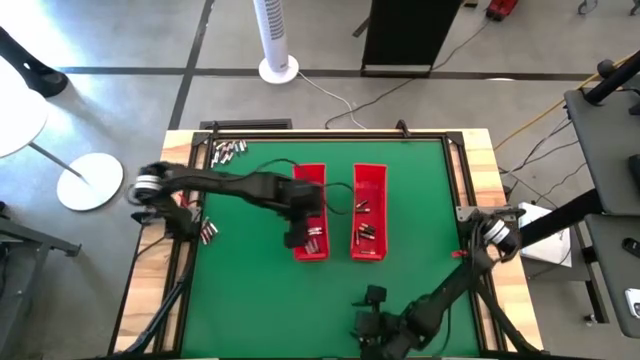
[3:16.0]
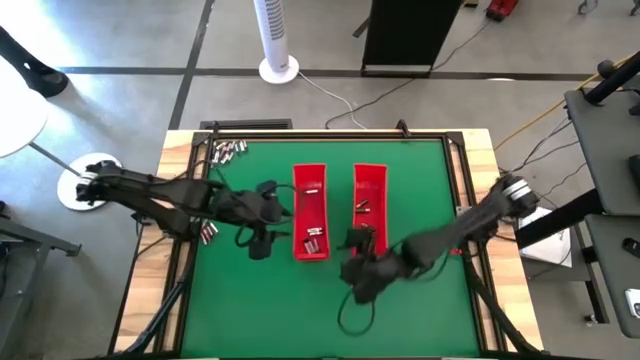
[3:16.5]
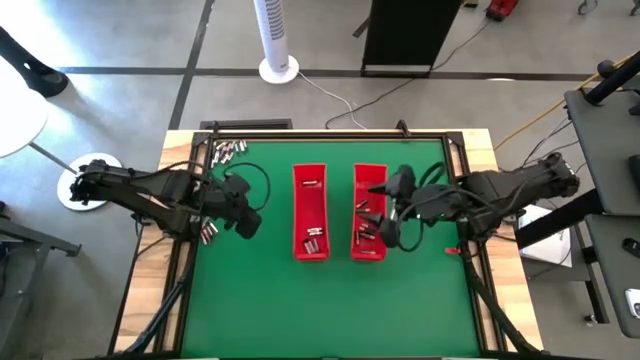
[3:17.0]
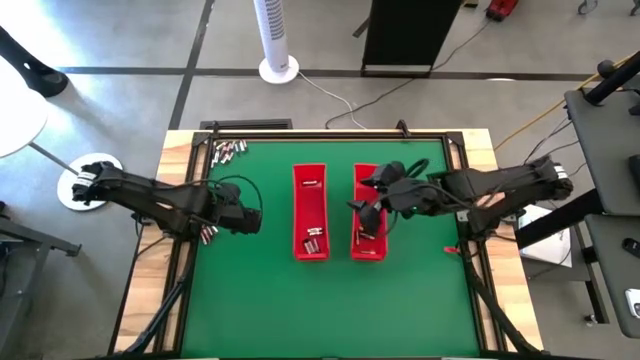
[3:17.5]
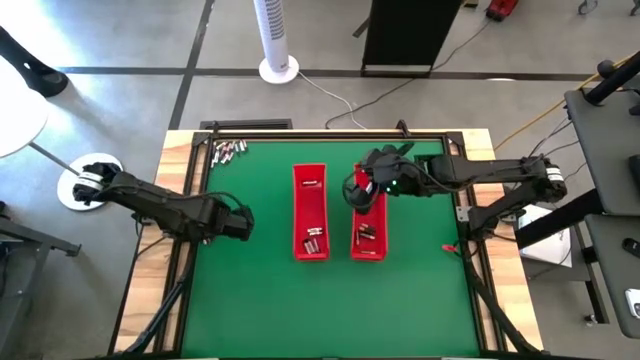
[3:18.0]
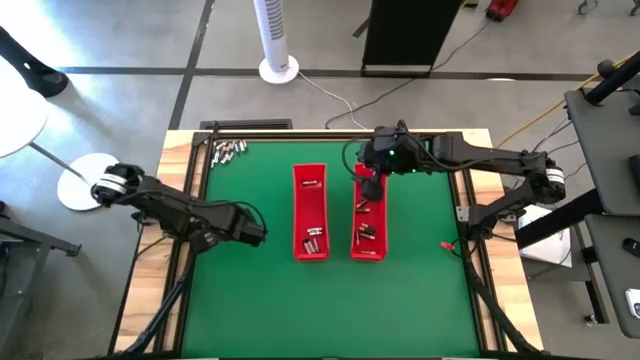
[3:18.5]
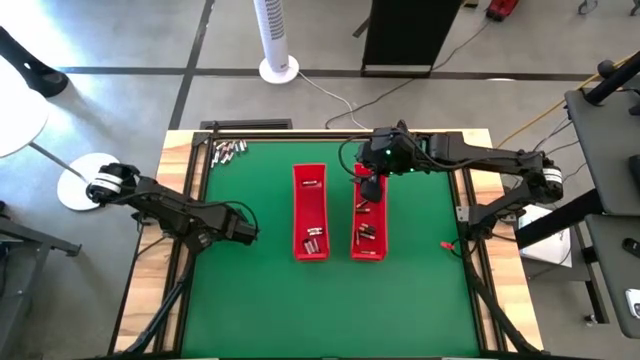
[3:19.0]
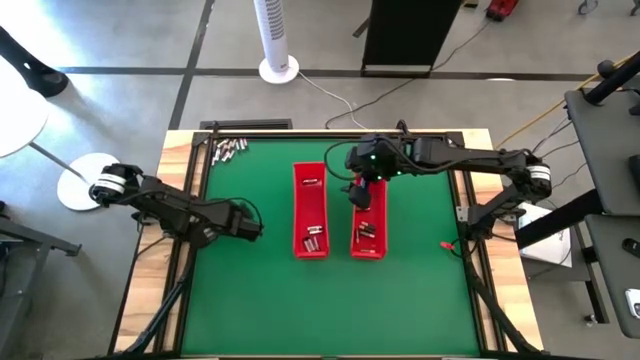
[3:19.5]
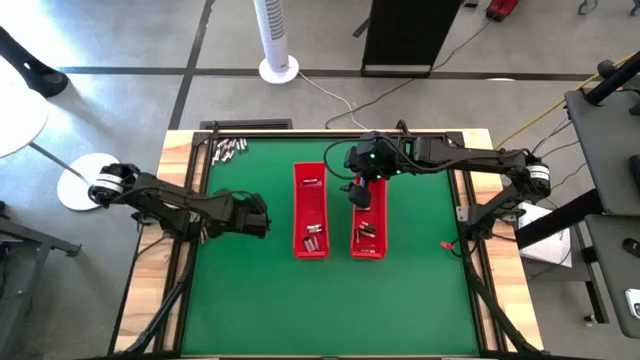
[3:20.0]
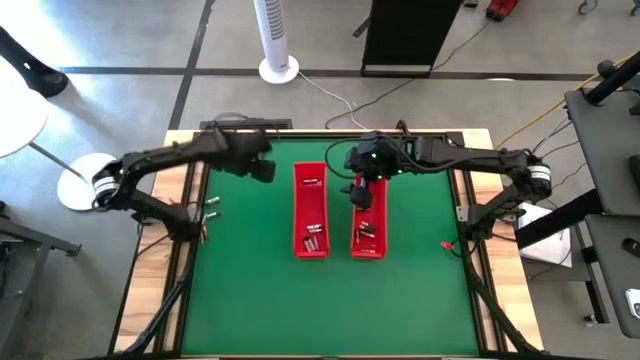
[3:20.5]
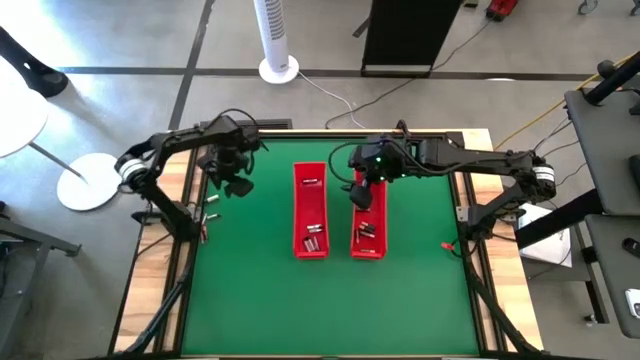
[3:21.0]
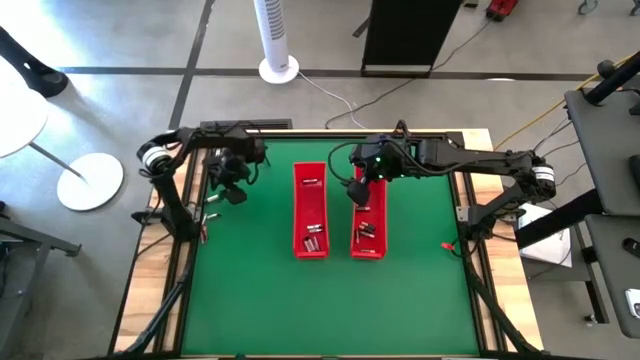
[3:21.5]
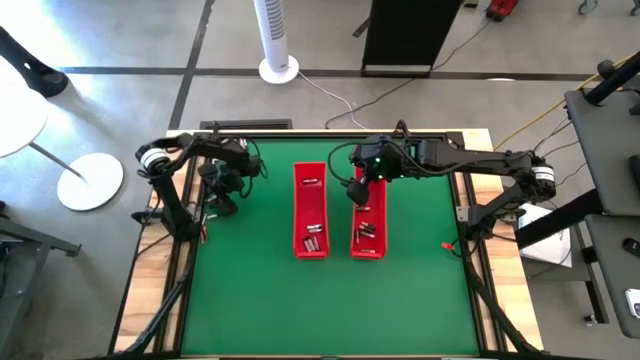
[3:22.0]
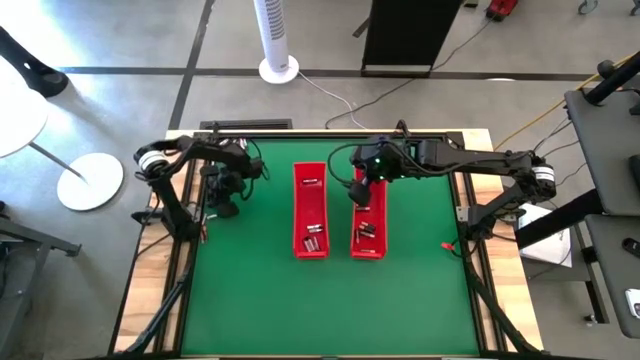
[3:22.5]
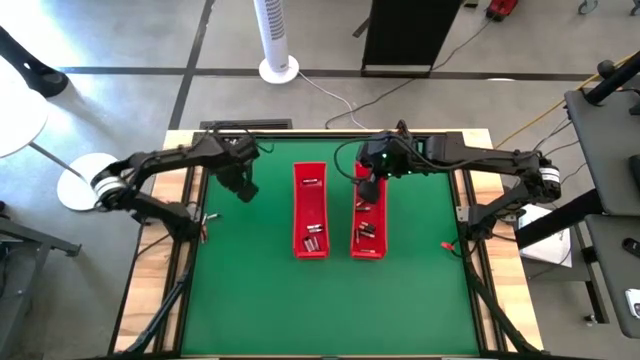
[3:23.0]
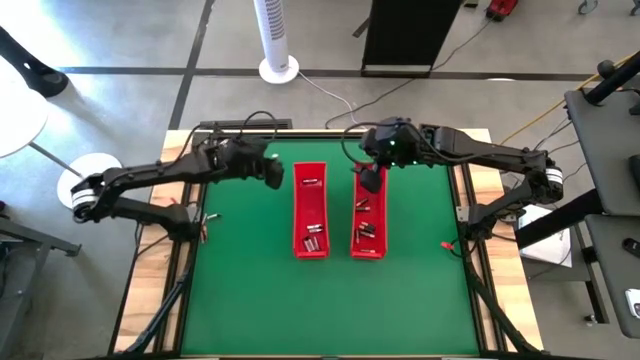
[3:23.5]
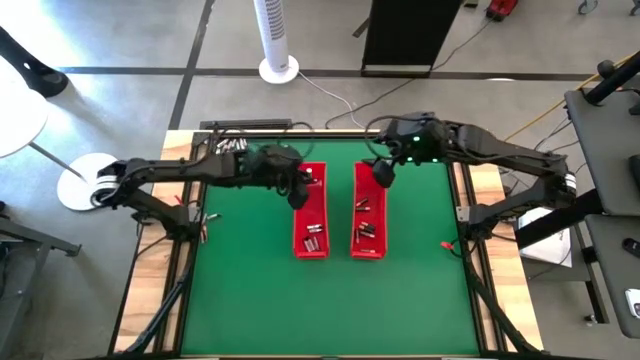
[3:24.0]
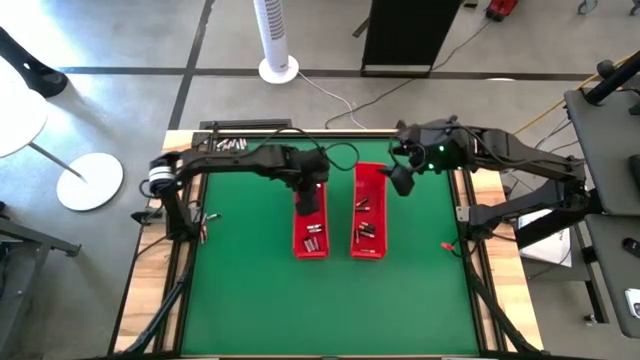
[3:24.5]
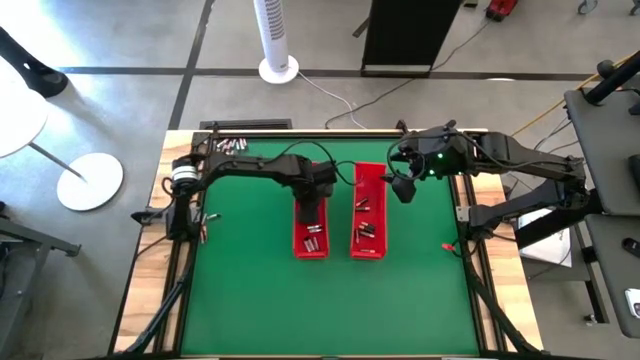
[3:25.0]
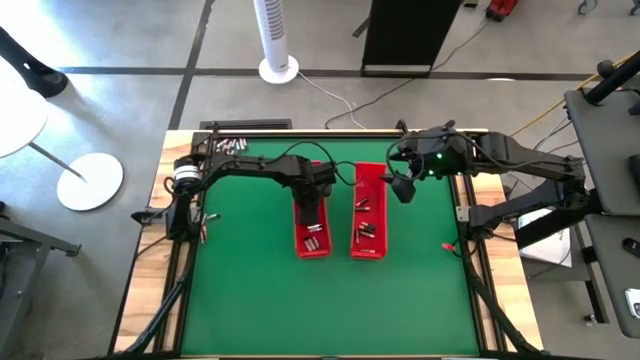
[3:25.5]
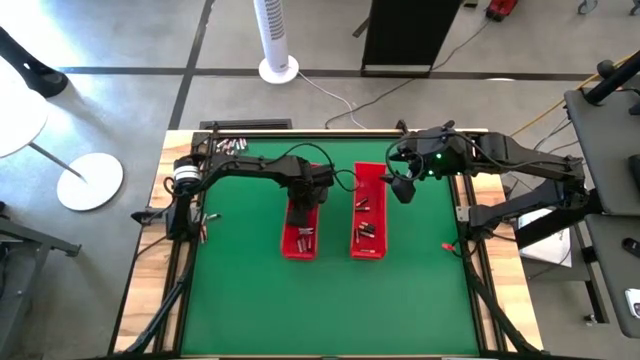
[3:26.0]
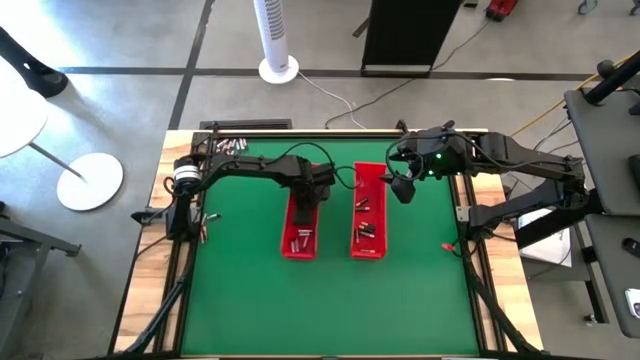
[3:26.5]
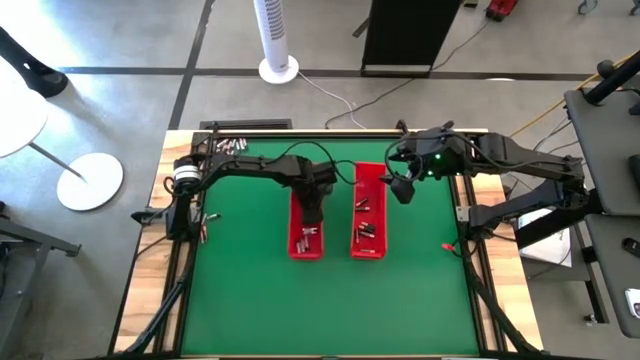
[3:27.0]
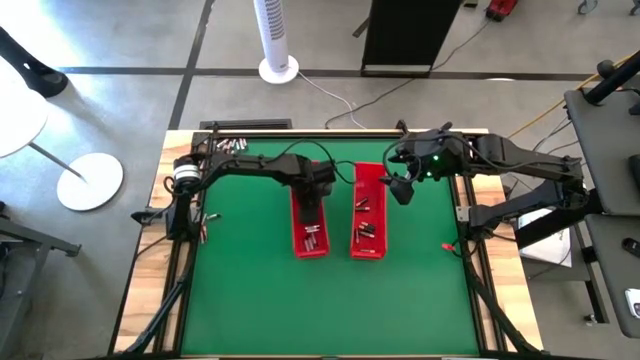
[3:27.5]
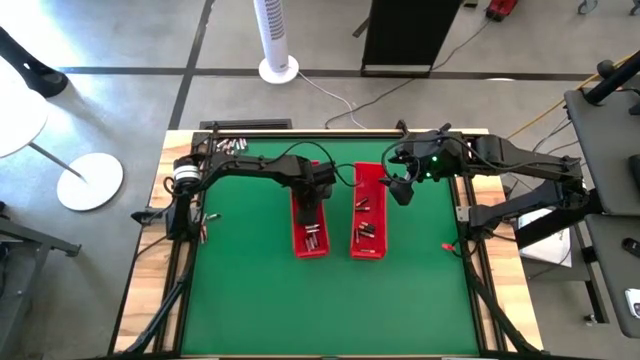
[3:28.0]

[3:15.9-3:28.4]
Task: Sort batteries
Put the silver battery into the left red bin

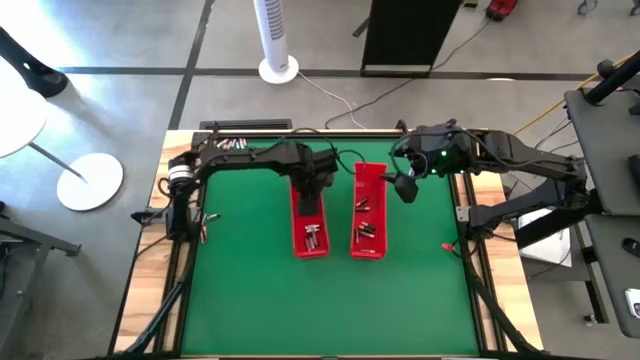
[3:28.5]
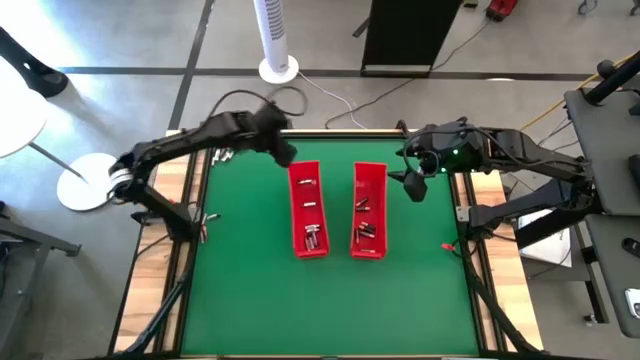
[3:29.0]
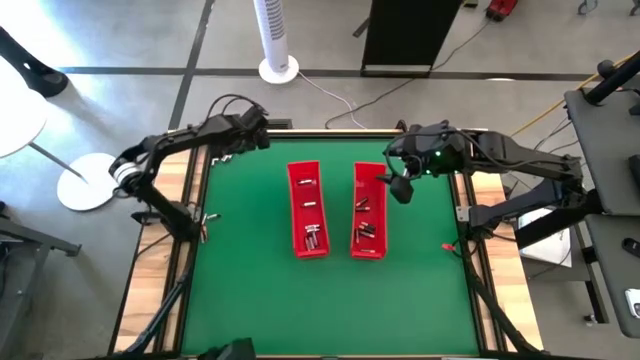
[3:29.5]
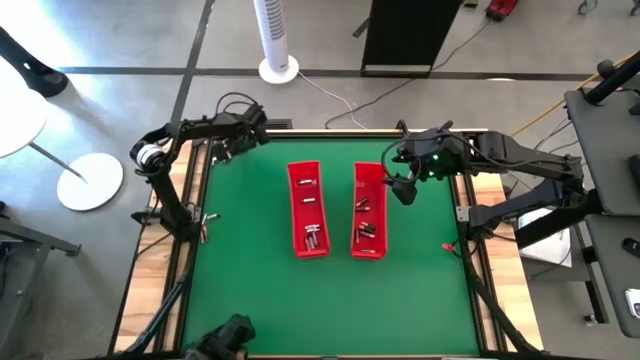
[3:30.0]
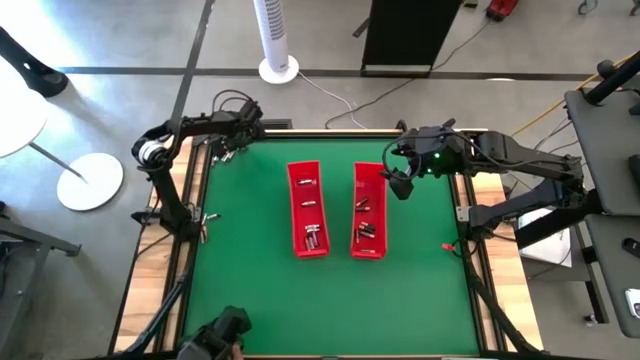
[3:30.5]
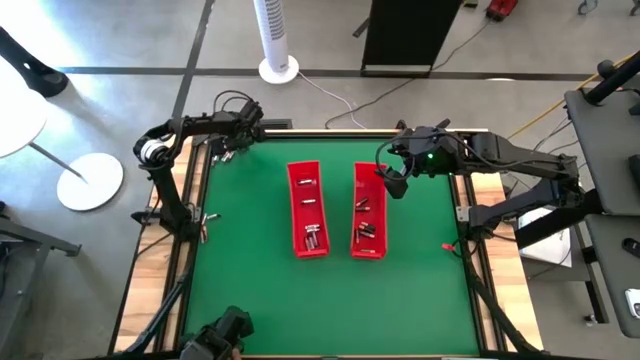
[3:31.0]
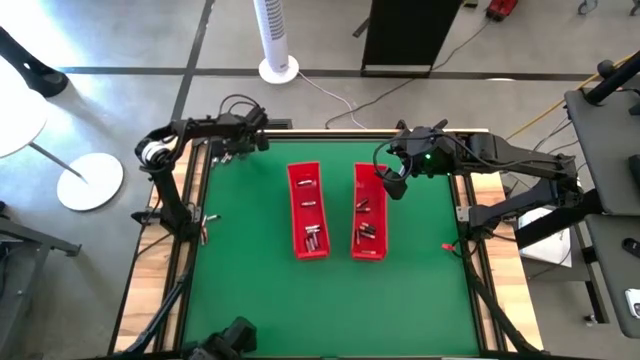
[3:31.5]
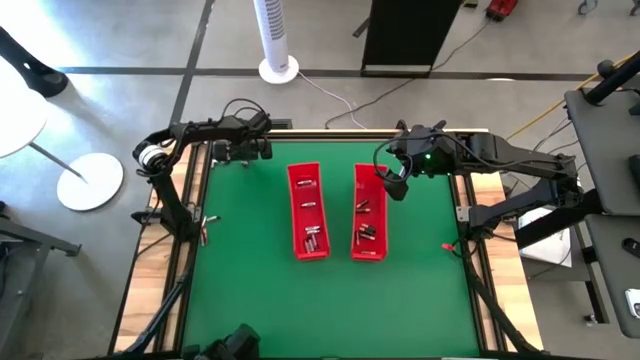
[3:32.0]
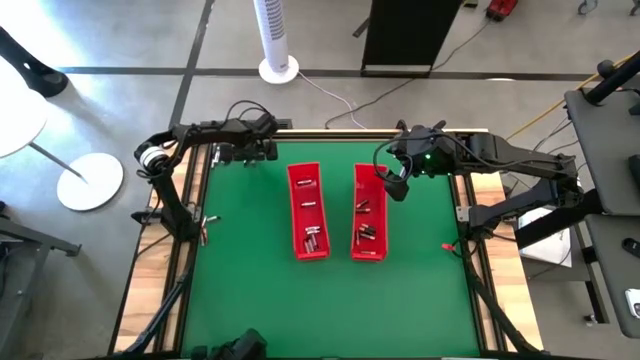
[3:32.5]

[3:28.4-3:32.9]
Put the silver battery into the left red bin

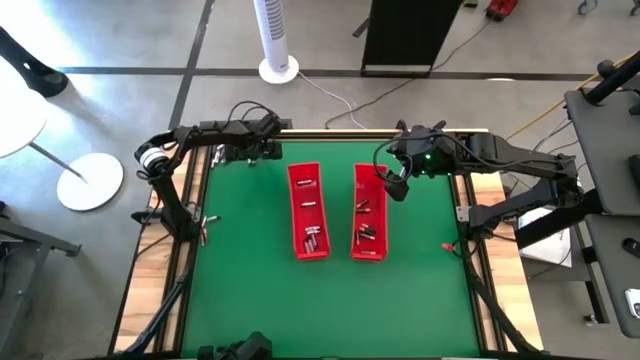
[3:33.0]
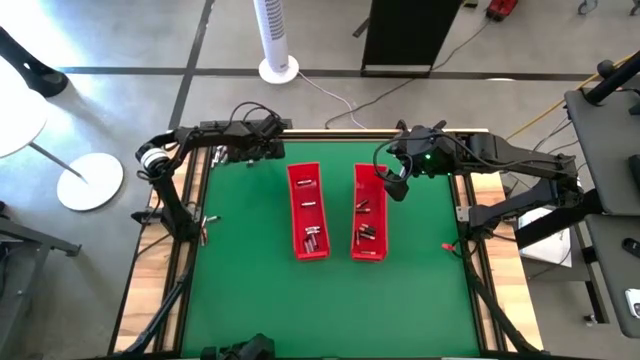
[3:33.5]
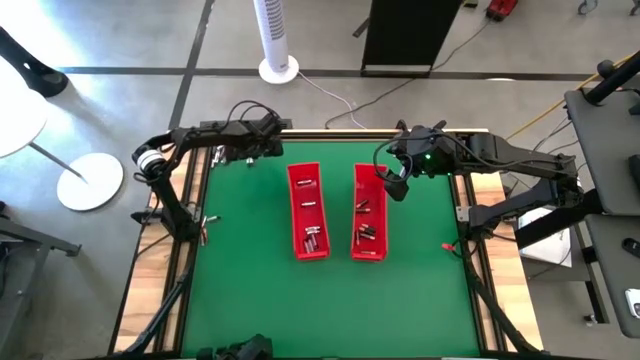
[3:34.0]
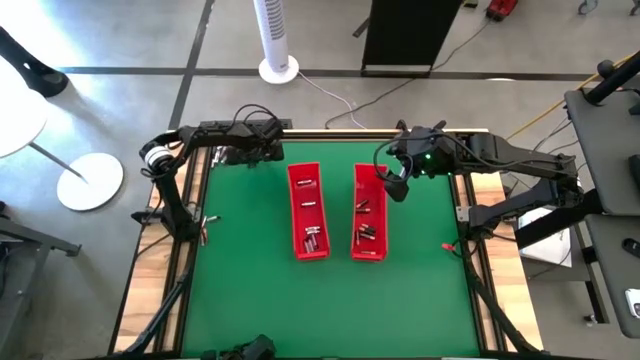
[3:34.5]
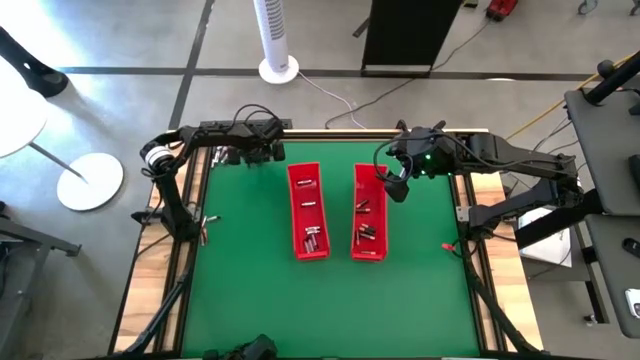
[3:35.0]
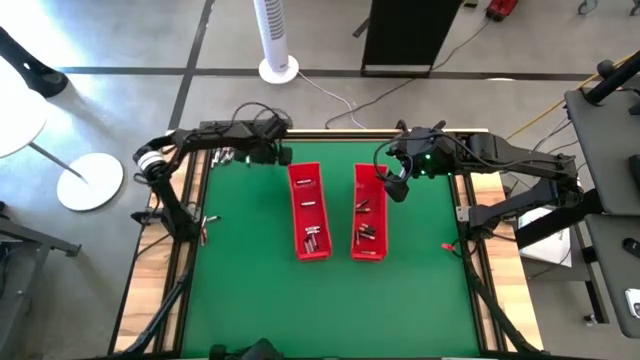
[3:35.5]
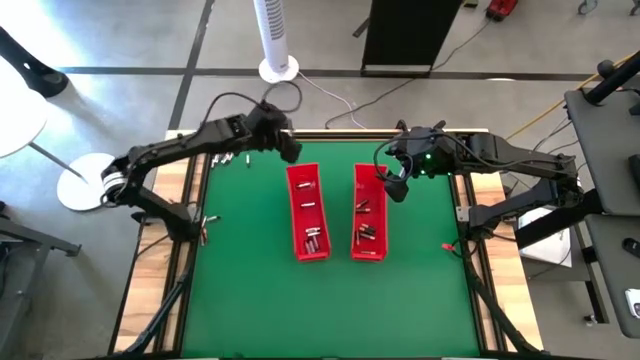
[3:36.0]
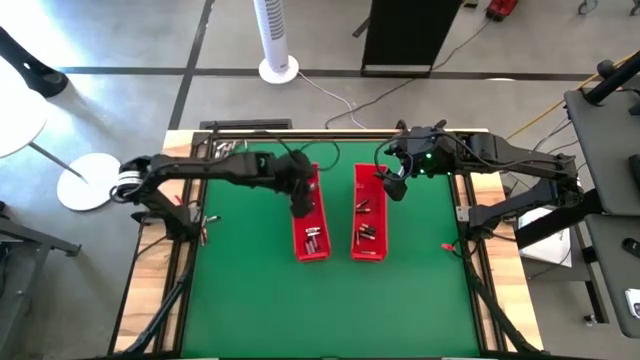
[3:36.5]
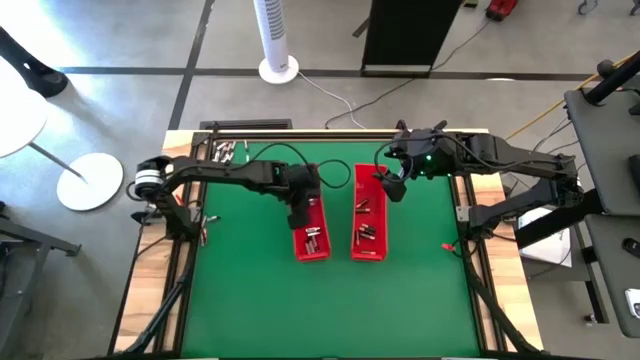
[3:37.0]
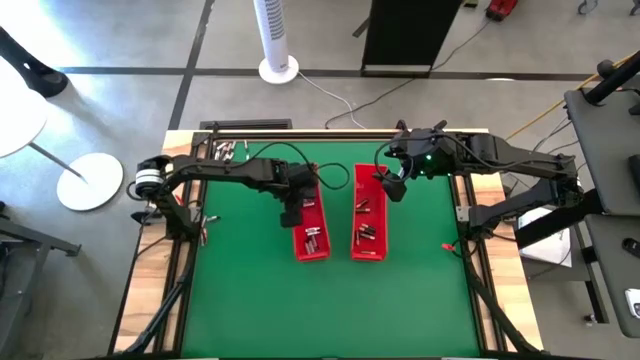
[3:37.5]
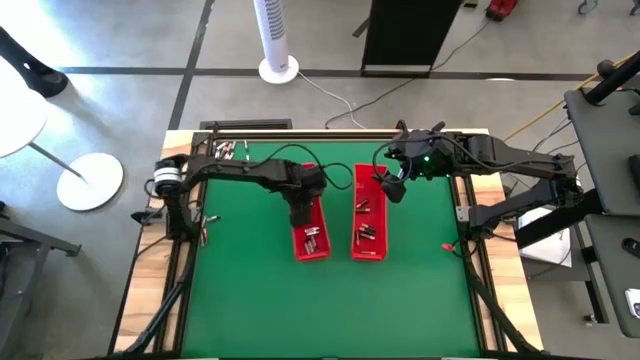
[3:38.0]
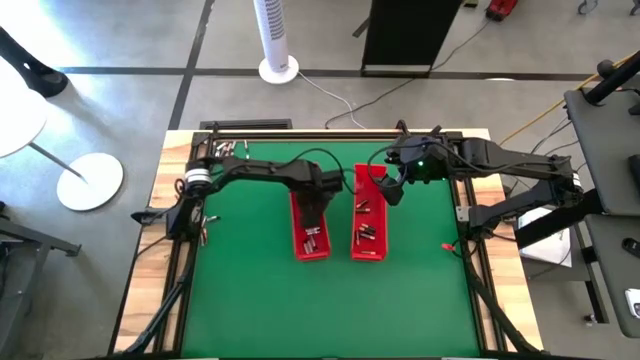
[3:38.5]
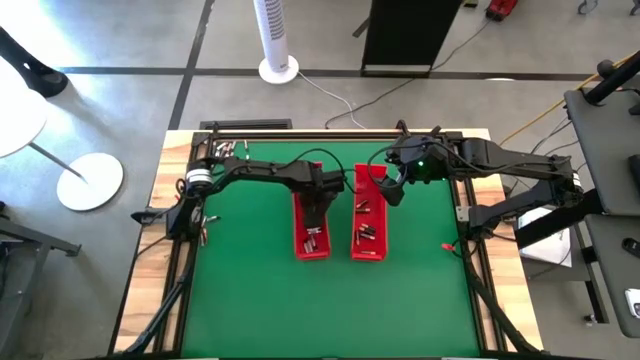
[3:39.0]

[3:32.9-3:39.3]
Put the silver battery into the left red bin
